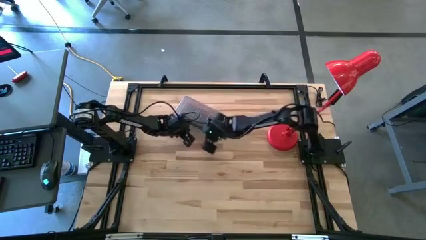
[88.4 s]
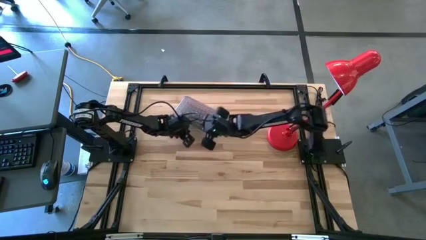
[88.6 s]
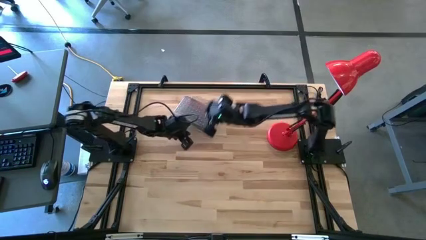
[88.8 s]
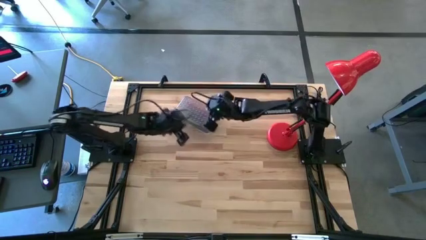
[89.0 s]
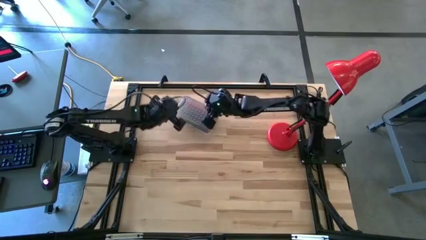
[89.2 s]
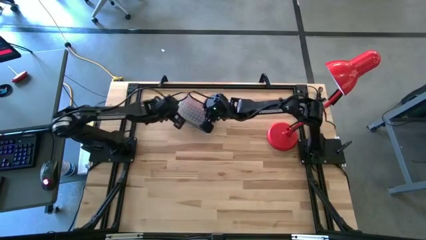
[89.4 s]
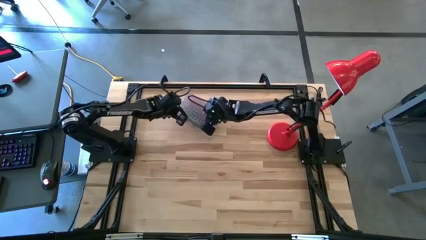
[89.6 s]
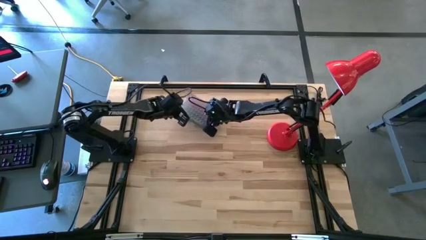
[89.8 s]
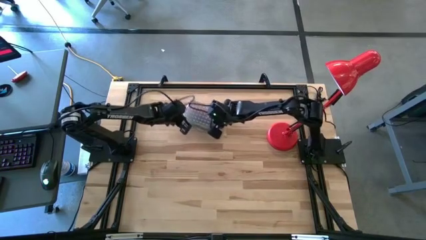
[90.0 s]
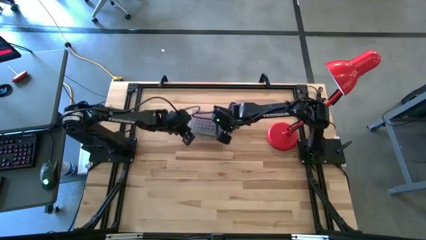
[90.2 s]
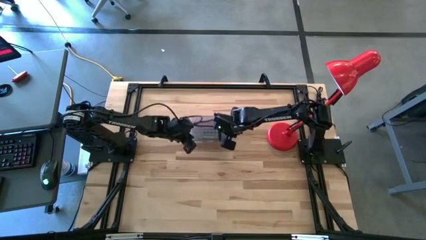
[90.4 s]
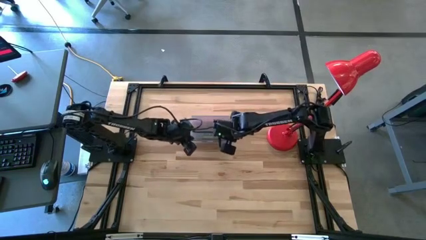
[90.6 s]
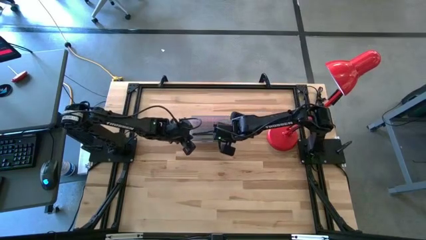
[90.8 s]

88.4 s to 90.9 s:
Task: Pick & place school supplies into a supply box
Adjust the pencil box to the top middle of the table

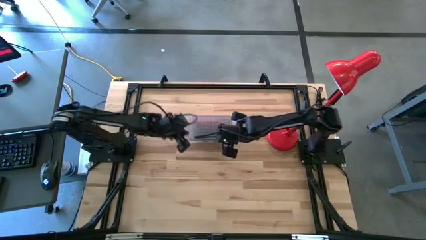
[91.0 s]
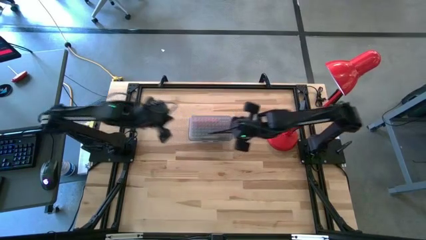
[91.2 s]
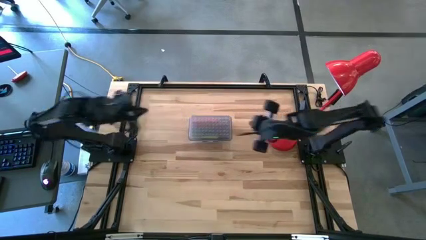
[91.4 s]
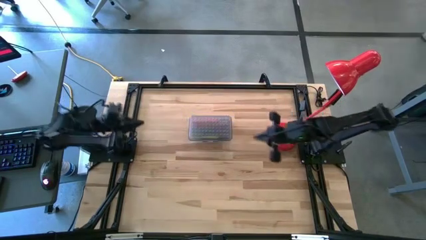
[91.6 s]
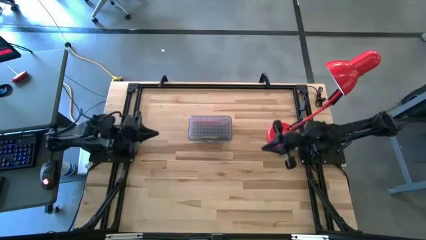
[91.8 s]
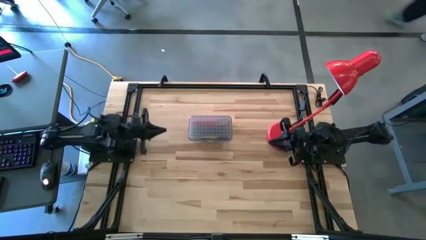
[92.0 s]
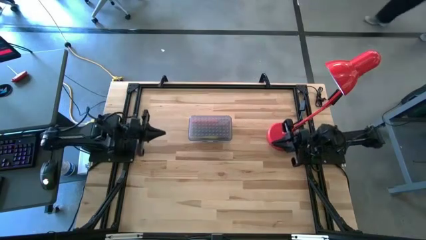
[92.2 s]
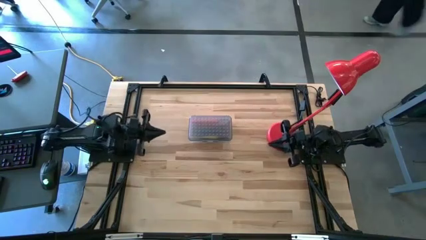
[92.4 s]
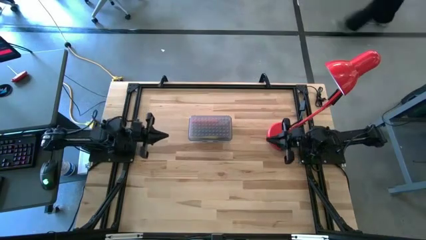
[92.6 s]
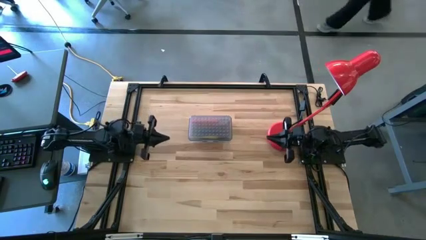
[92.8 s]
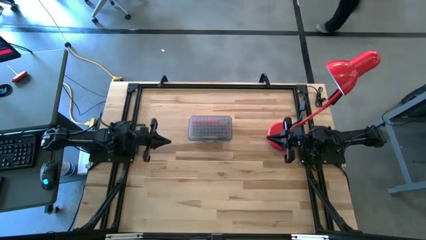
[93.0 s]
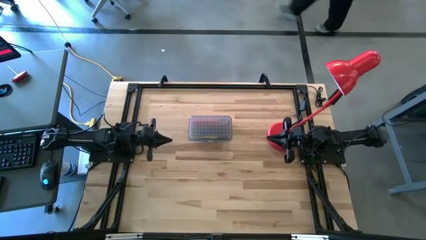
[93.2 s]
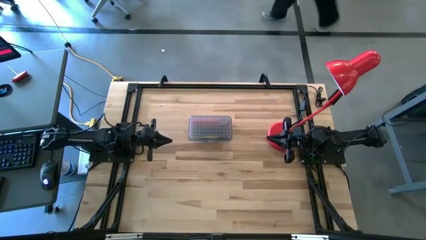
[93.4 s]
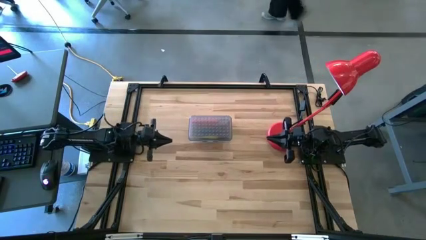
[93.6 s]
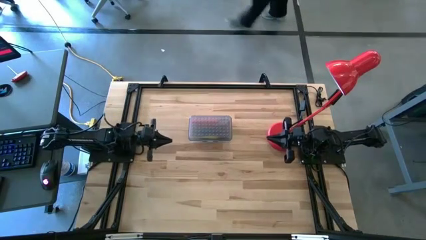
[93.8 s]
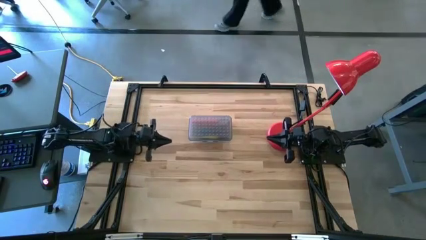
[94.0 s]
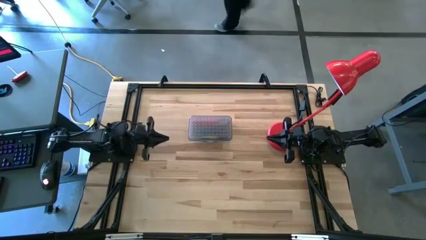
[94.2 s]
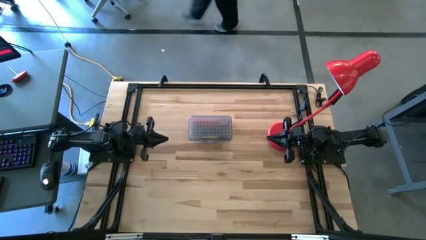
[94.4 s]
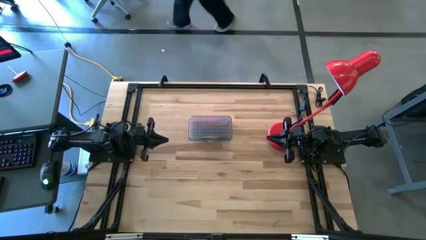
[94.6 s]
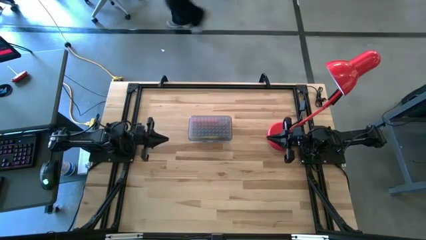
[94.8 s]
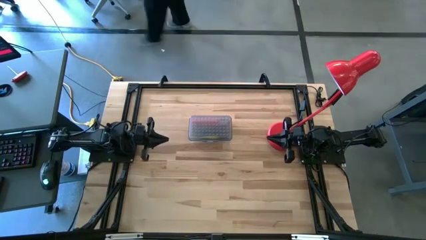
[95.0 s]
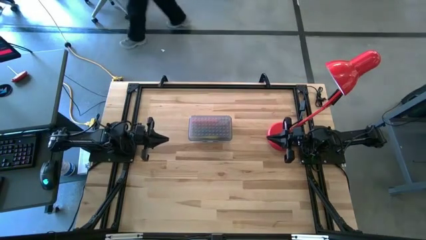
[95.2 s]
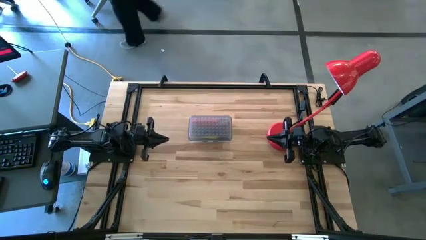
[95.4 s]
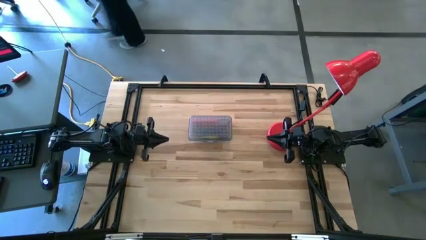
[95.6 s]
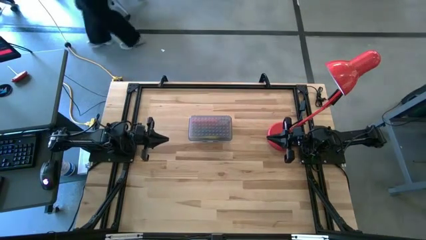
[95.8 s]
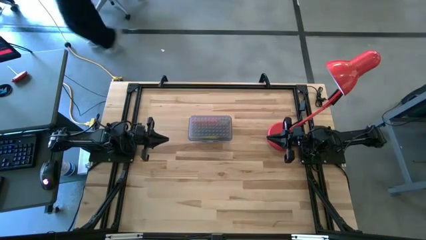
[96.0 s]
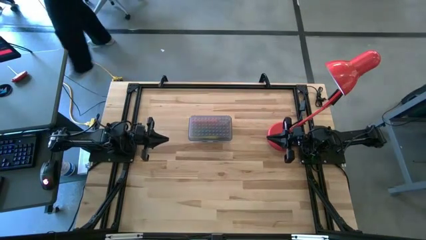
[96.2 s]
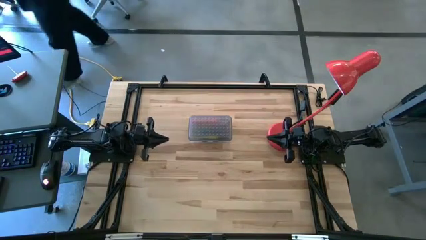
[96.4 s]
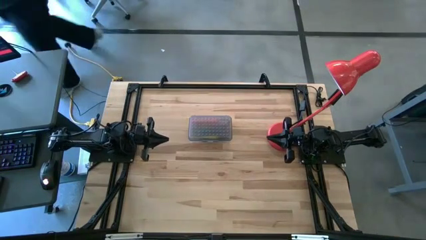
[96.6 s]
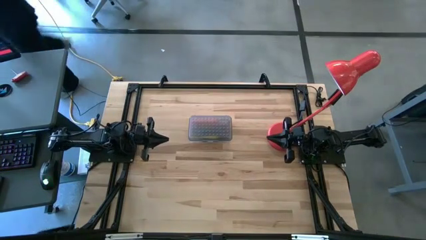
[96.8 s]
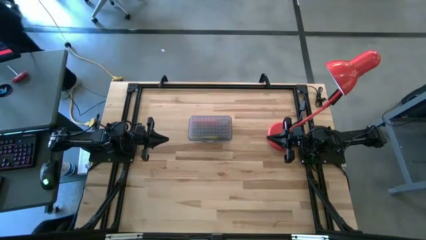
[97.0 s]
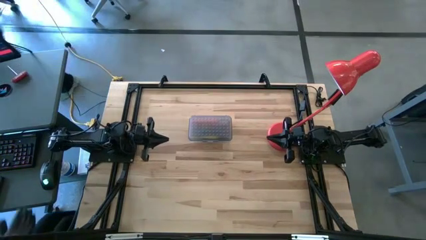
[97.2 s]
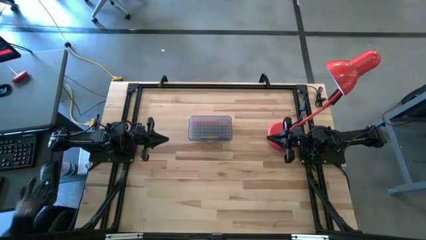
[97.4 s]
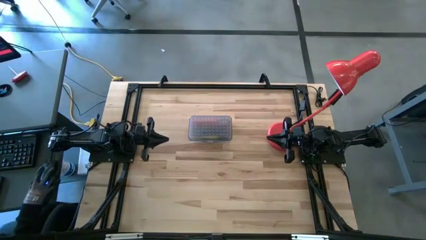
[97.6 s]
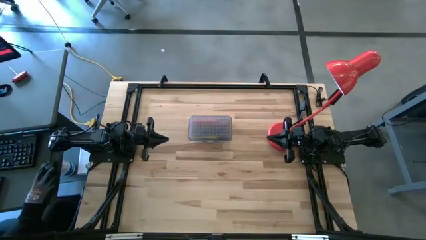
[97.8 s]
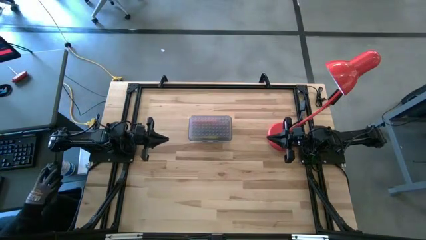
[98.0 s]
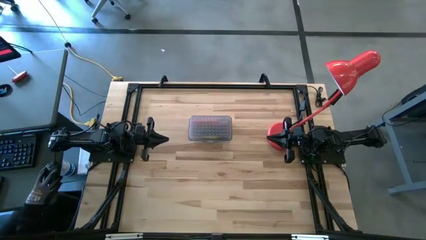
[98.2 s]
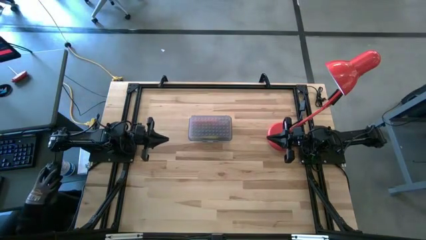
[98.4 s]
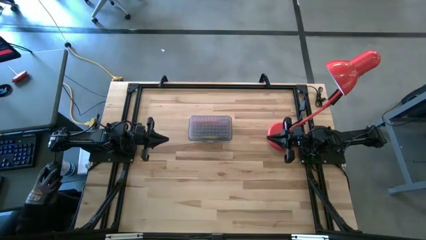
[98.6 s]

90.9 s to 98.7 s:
Return to Home Position

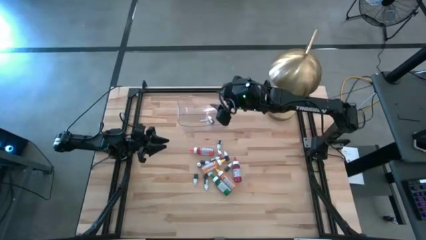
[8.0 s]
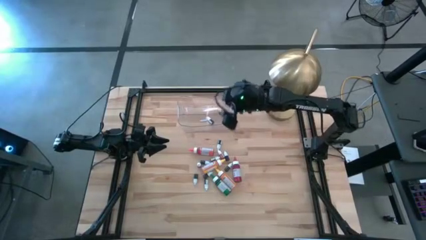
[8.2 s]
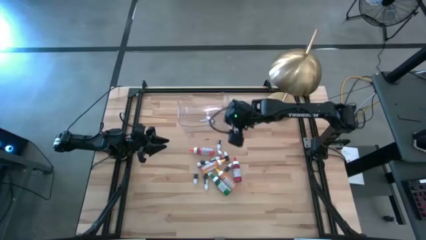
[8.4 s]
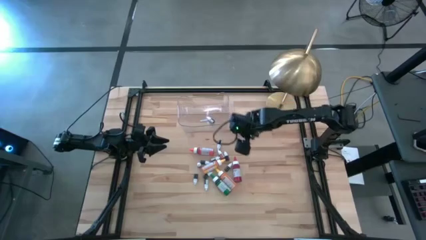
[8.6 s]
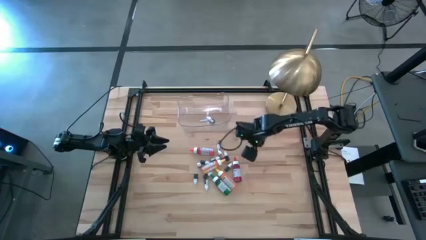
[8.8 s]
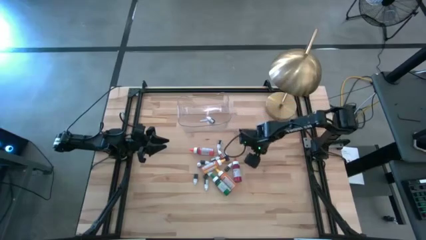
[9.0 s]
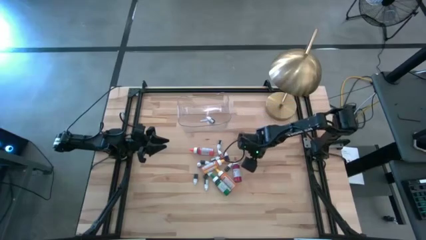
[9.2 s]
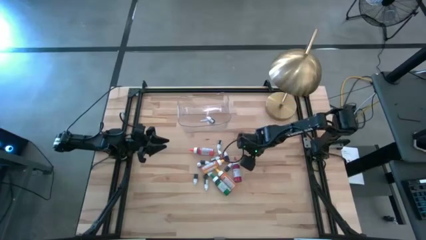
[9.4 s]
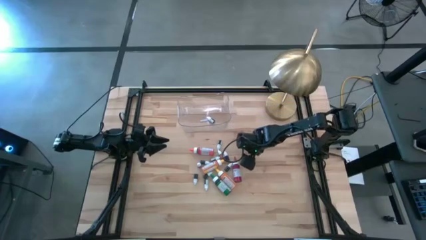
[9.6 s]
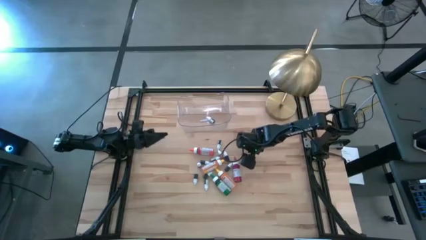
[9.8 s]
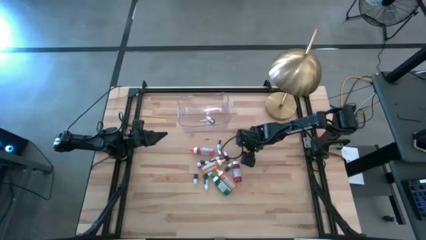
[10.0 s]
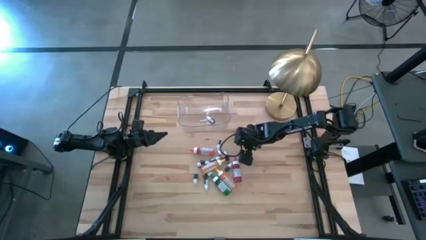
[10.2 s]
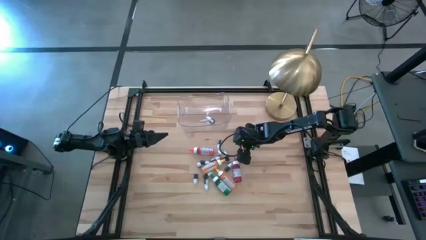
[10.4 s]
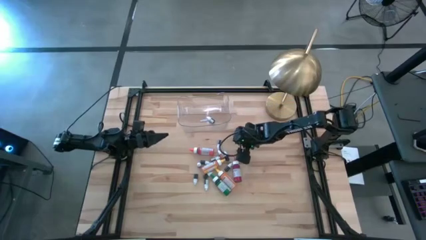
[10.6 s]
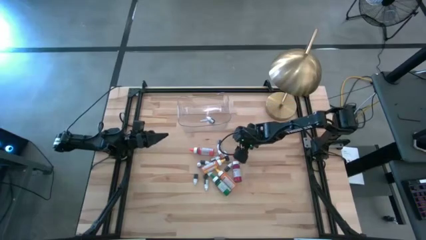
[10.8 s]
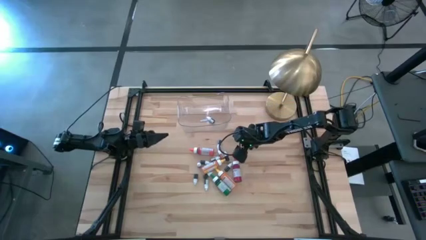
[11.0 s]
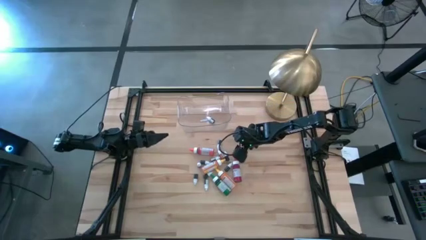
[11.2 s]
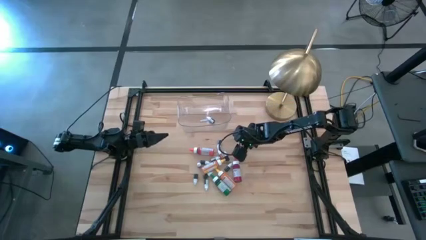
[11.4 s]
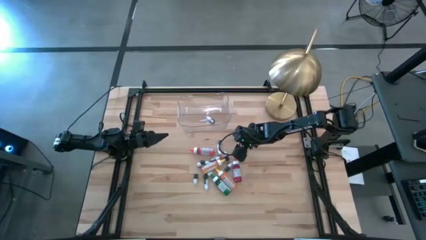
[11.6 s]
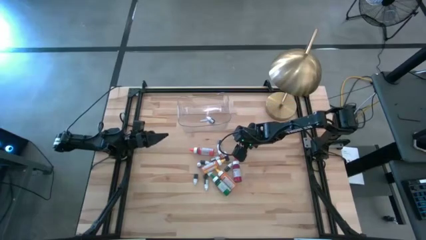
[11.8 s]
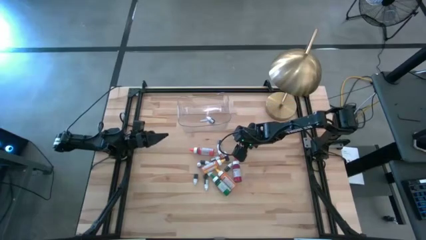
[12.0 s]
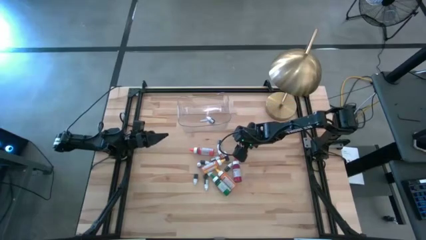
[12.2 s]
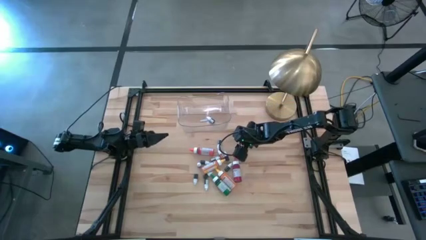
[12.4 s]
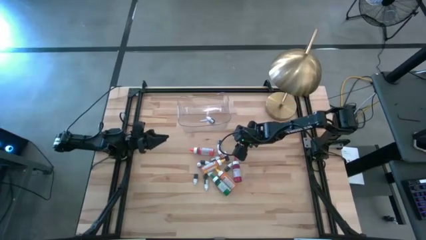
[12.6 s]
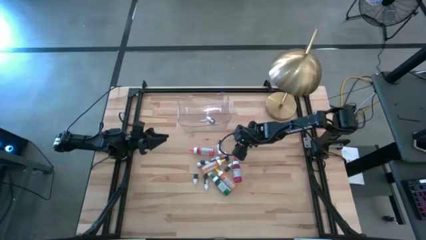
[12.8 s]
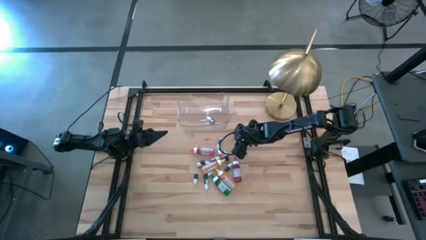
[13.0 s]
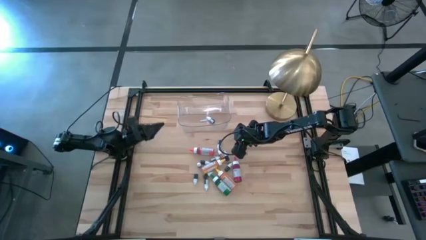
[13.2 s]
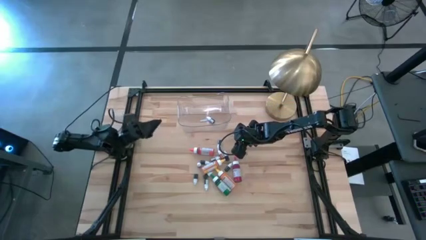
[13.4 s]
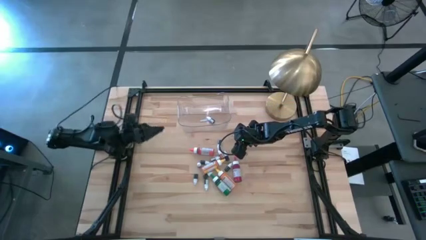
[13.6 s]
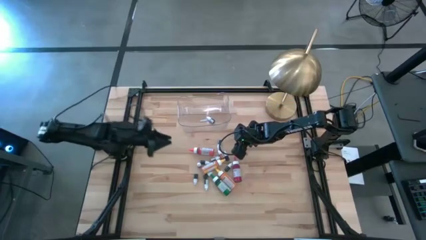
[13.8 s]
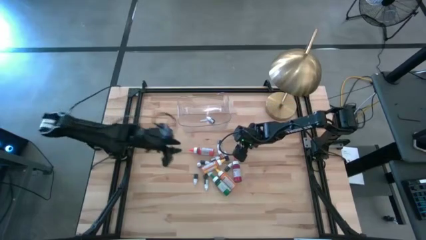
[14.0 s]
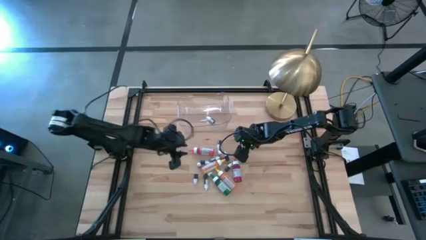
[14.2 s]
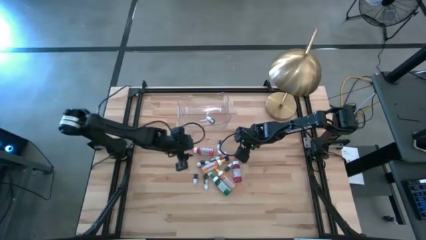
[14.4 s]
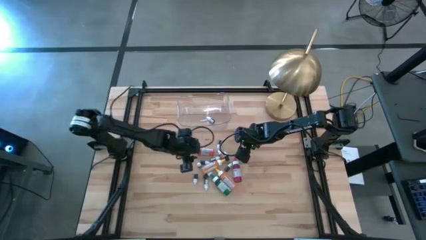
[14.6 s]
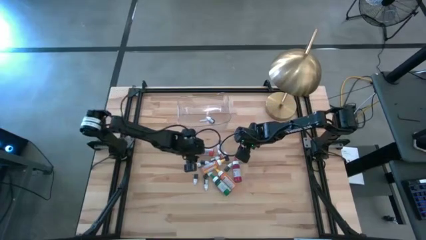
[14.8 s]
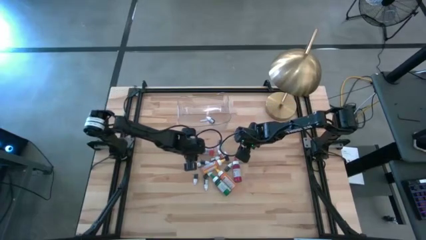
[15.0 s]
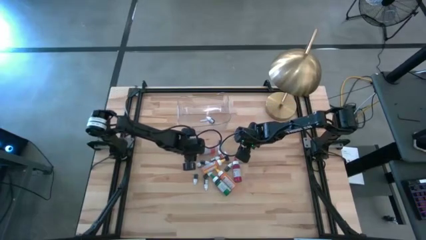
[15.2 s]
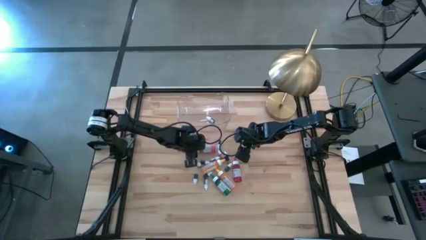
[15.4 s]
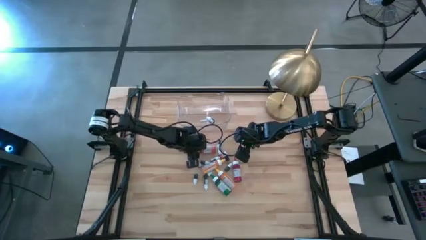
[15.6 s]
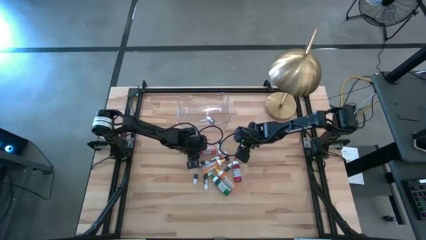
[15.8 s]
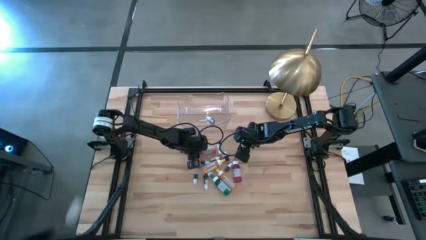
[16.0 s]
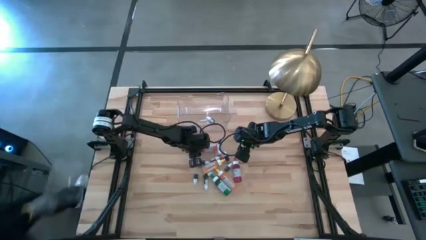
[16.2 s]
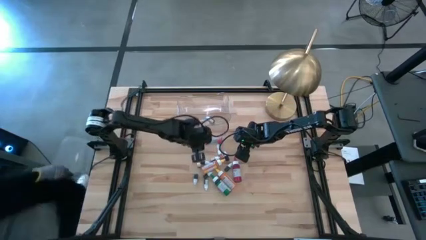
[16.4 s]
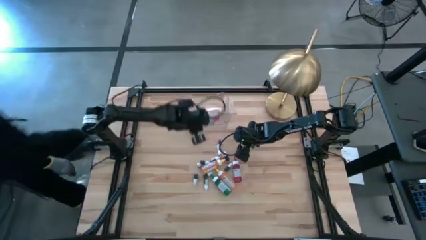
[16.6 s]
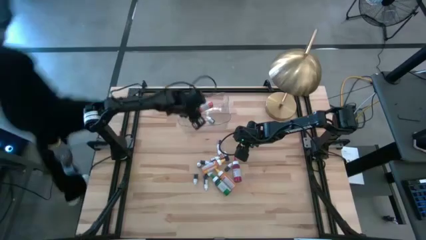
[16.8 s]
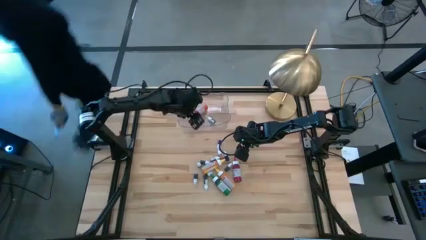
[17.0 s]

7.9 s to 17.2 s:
Task: Pick & Place food coloring
Put the large orange food coloring bottle into the transparent bin
